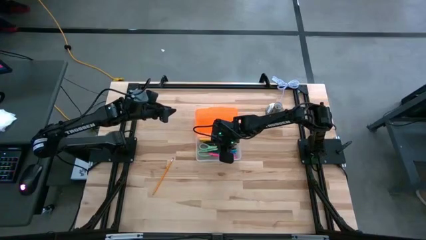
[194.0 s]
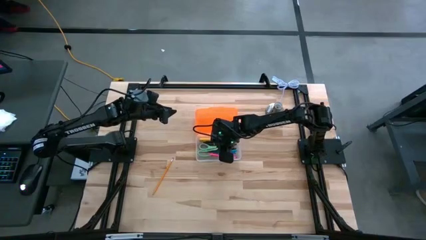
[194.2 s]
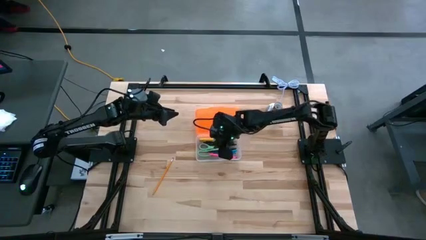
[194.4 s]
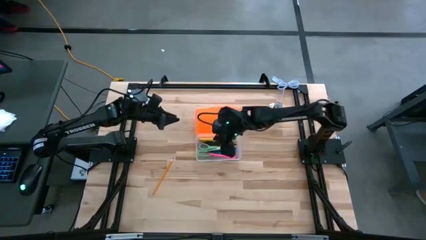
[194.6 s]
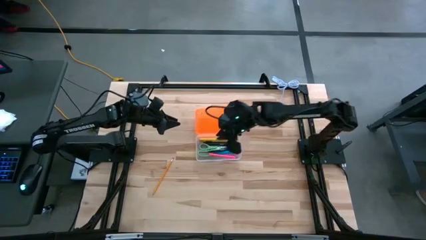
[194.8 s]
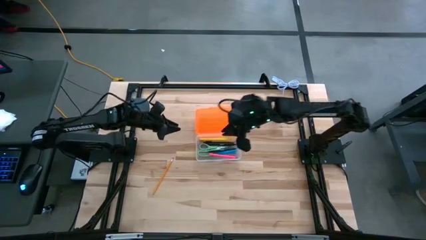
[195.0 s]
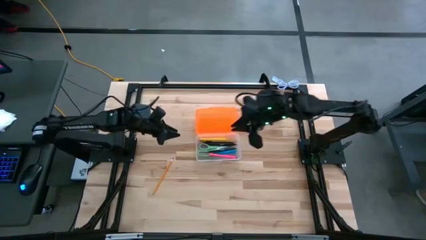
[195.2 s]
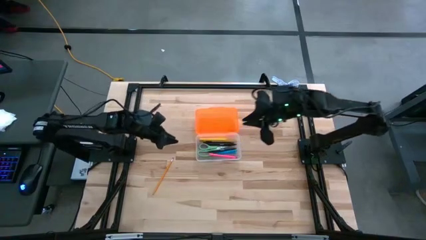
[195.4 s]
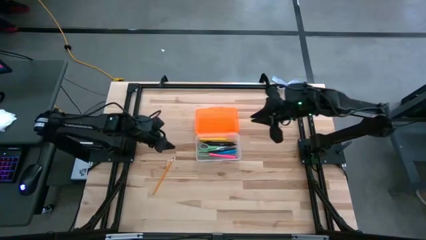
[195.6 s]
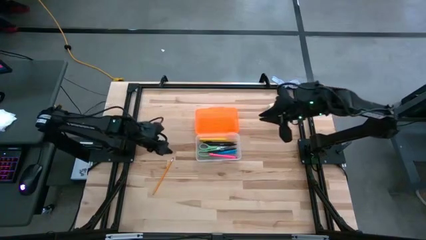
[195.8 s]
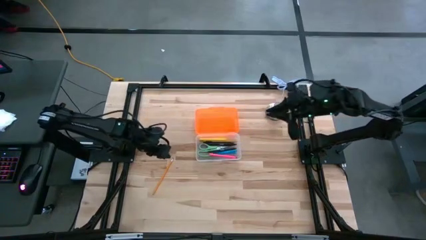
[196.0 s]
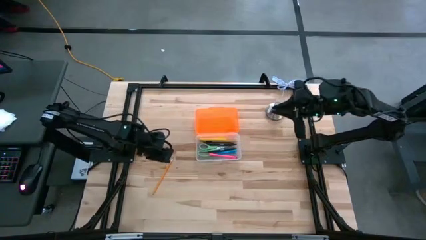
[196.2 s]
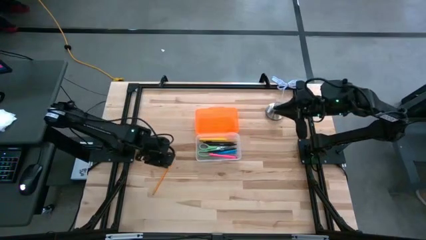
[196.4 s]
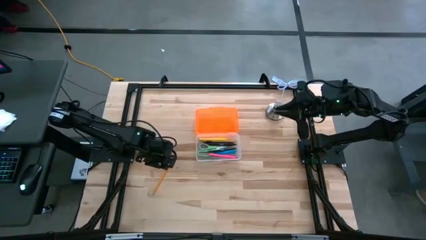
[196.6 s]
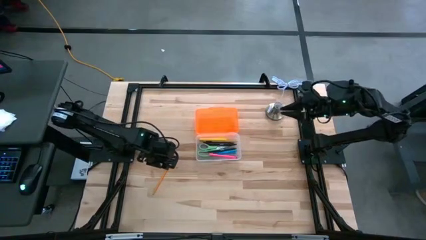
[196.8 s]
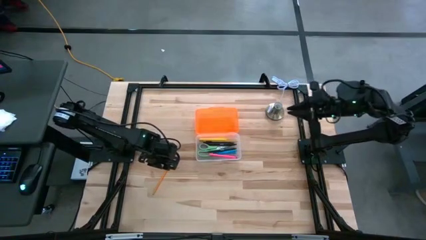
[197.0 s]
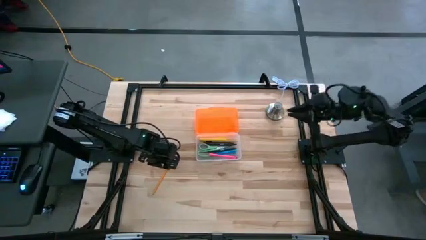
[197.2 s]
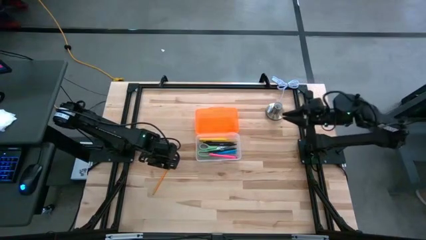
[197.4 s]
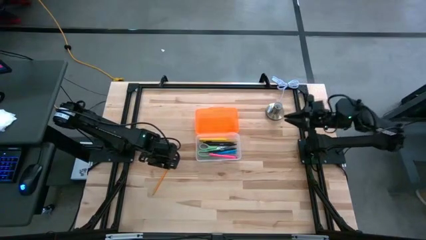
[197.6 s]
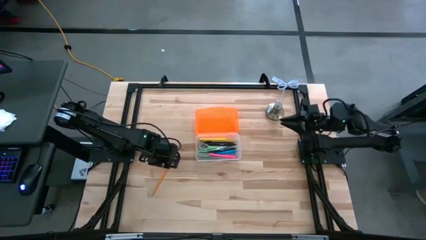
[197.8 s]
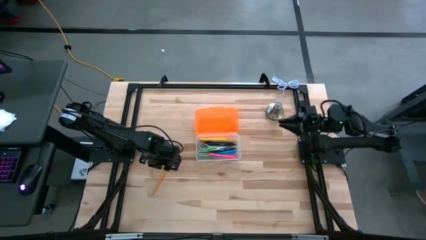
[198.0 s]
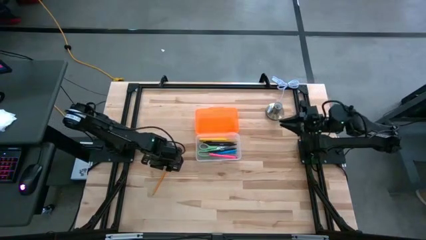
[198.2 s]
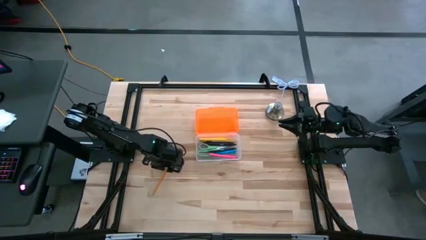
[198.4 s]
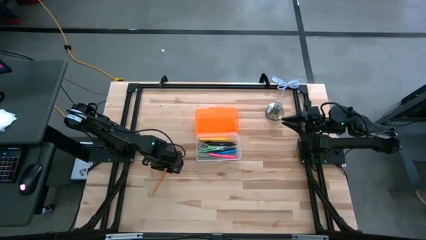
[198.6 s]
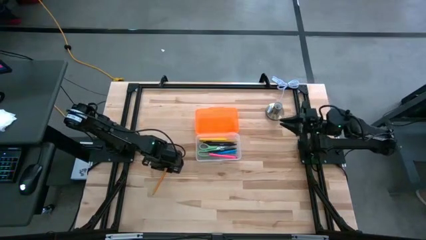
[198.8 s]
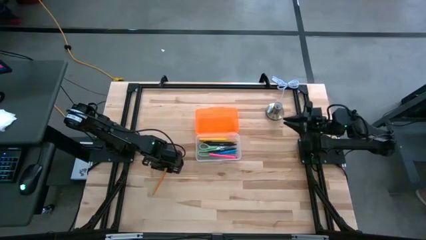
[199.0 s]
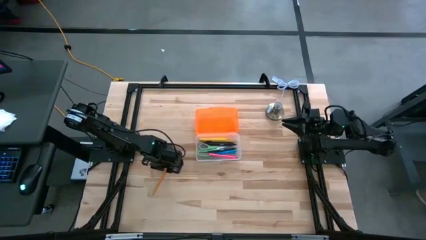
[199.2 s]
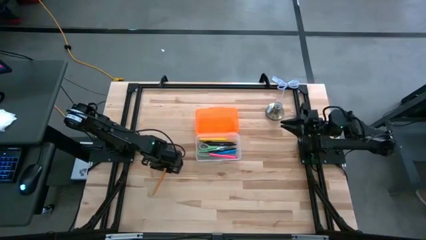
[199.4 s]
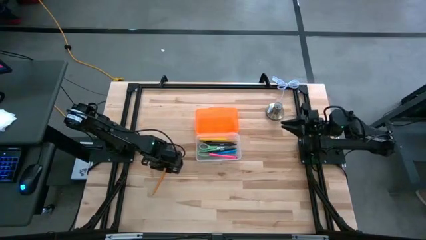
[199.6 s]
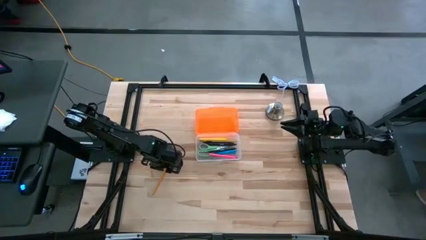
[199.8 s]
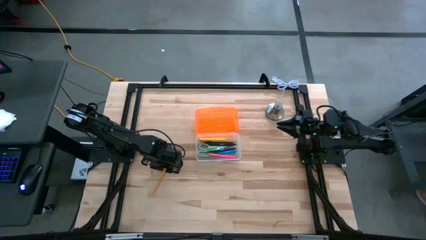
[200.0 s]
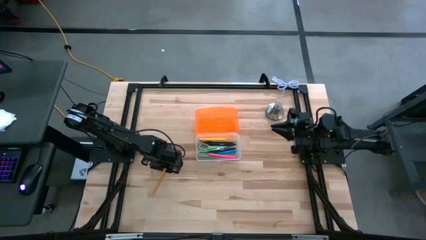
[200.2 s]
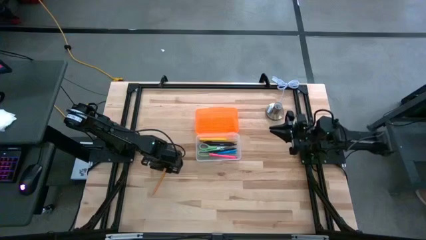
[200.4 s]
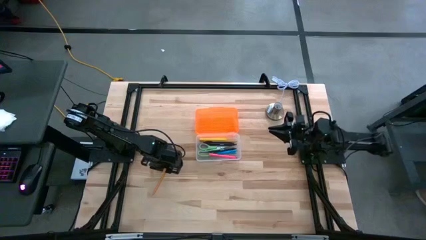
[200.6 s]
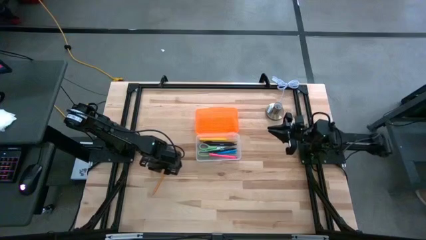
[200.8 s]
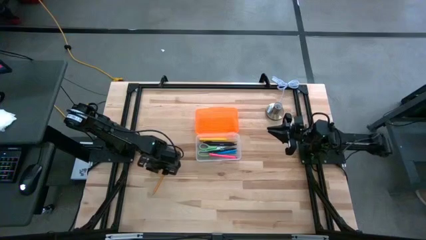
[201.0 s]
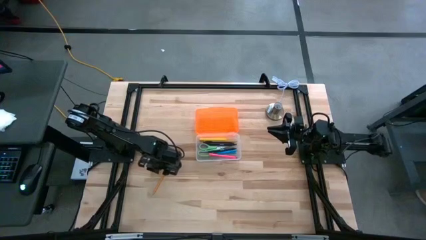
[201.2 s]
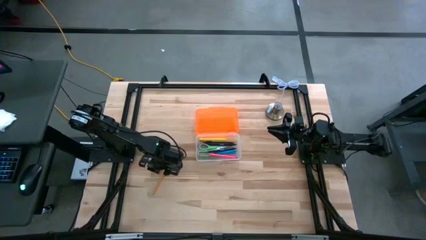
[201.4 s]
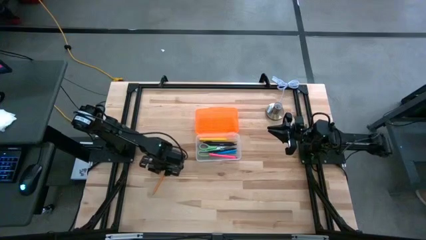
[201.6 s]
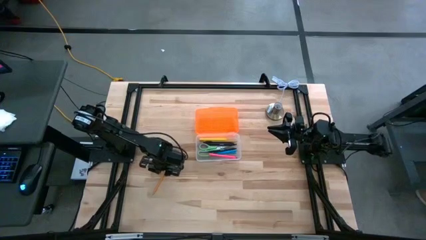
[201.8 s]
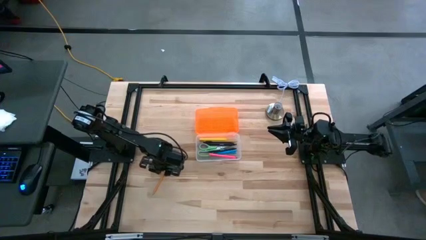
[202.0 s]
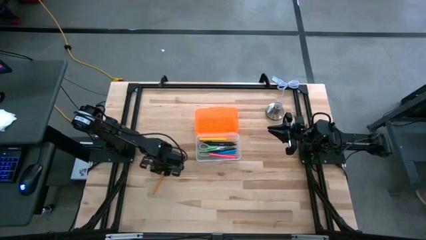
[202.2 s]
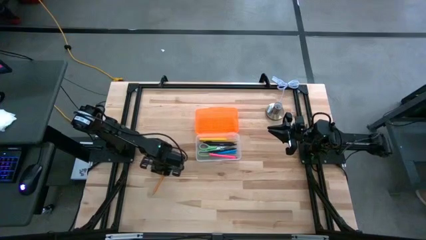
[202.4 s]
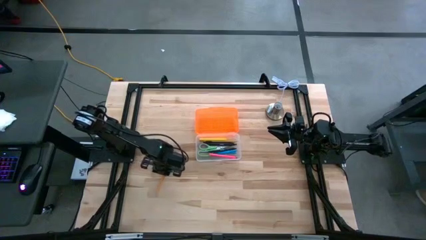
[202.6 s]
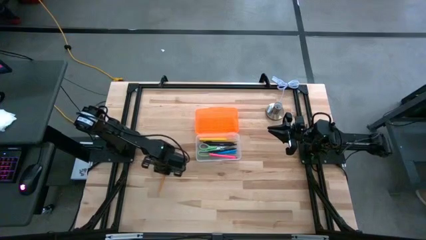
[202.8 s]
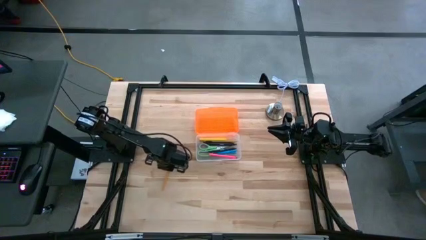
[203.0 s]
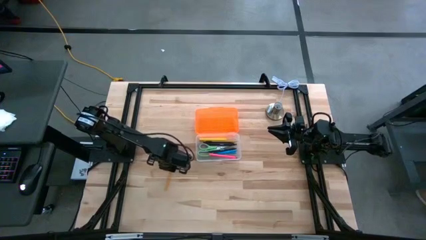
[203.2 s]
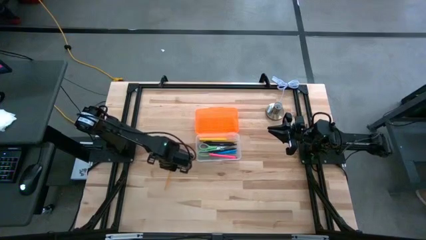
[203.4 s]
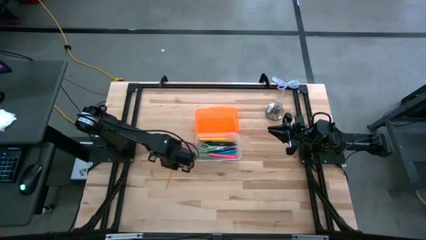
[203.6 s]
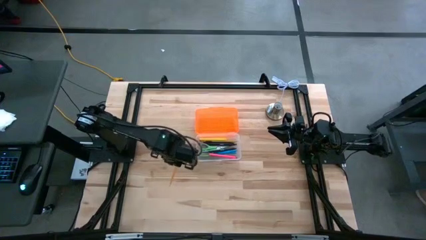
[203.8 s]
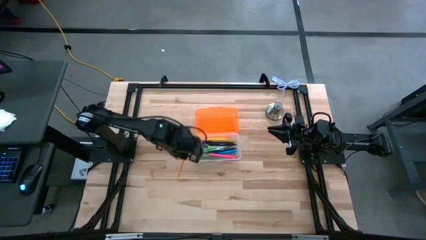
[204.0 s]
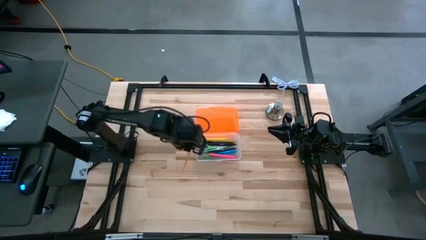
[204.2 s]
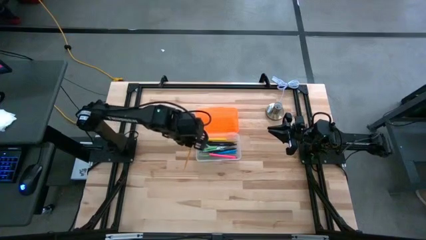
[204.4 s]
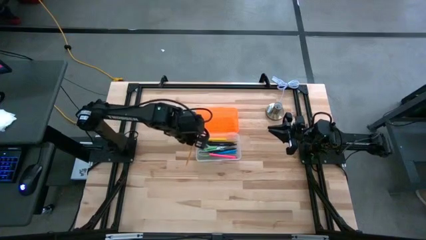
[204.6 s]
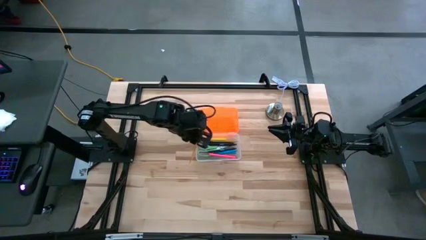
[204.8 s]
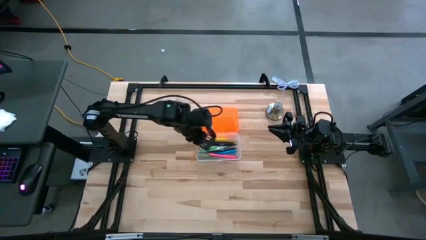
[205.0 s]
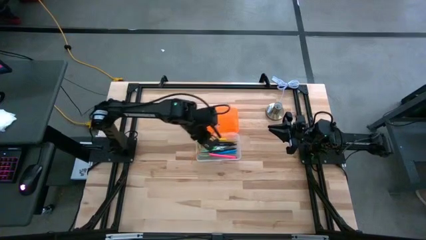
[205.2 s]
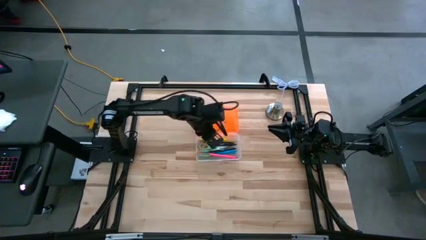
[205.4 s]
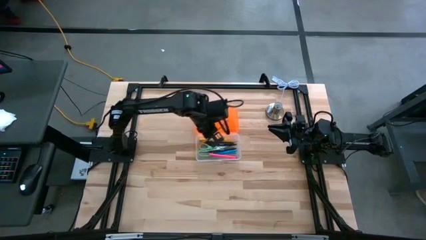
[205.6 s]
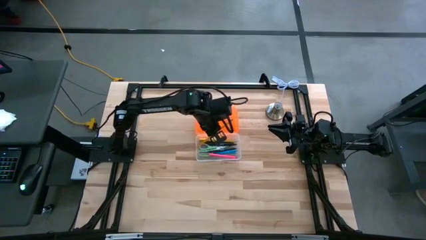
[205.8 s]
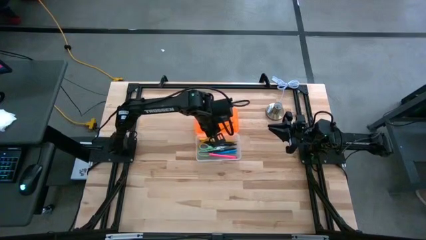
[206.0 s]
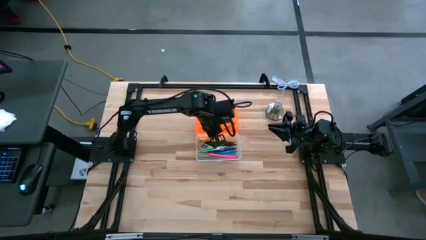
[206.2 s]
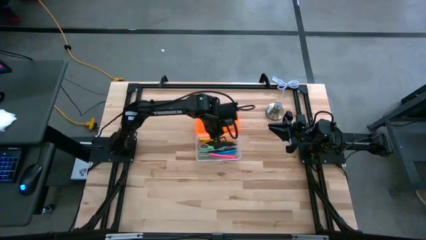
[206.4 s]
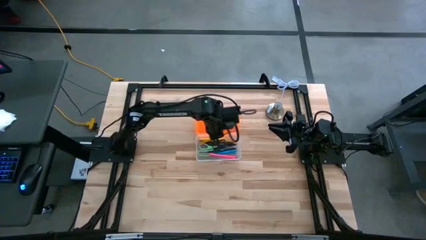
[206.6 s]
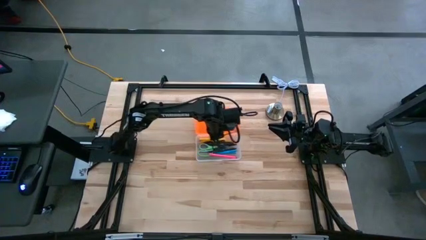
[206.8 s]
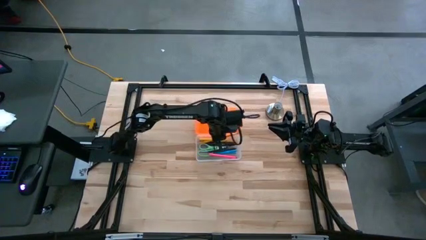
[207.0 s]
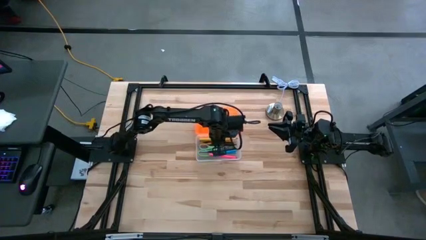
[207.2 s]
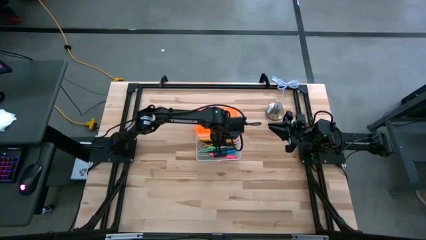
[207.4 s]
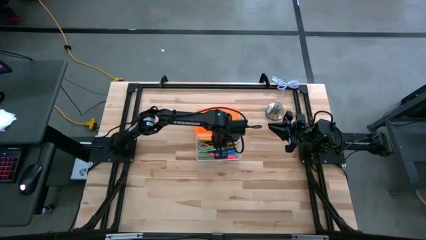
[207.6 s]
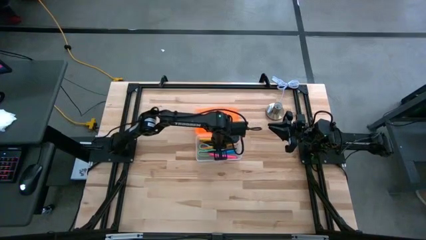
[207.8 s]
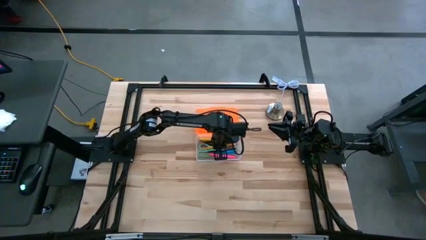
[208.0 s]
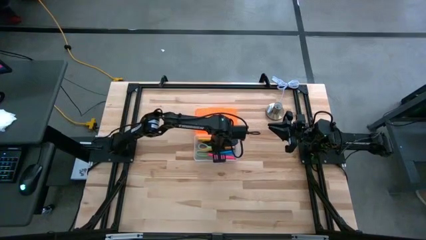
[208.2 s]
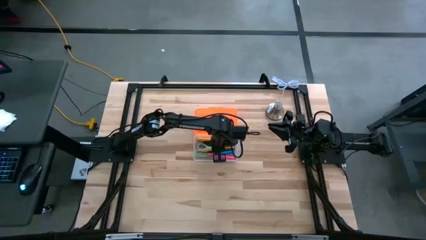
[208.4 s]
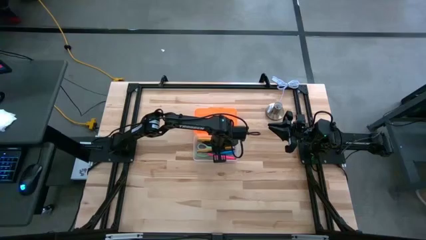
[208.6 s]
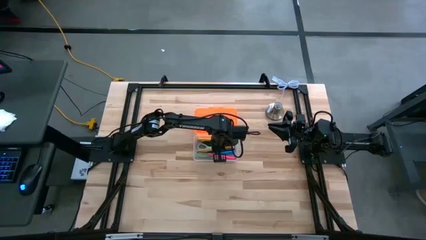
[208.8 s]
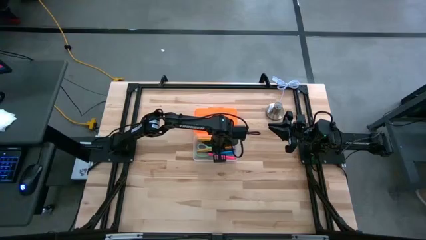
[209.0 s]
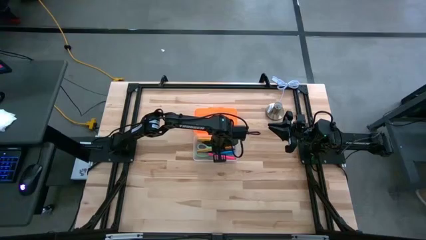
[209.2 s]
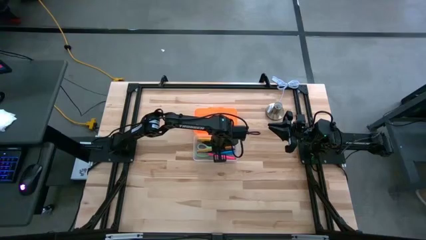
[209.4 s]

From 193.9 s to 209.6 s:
Task: Pick & place school supplies into a supply box
Put the orange pencil into the orange supply box
